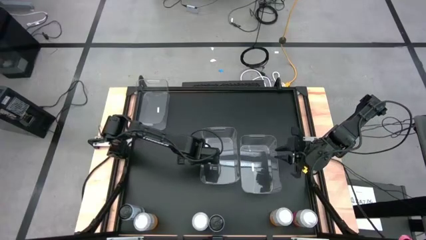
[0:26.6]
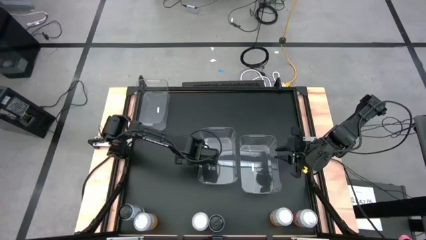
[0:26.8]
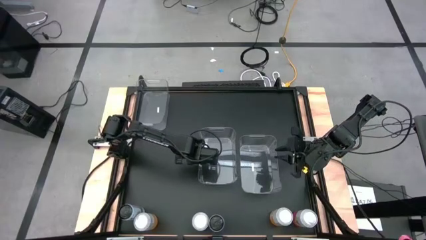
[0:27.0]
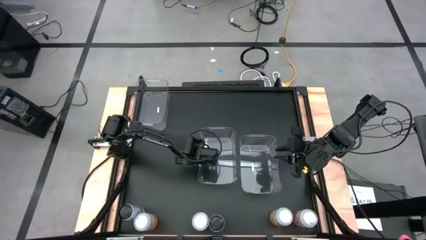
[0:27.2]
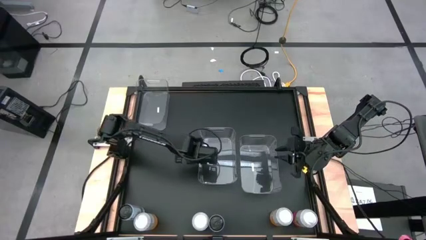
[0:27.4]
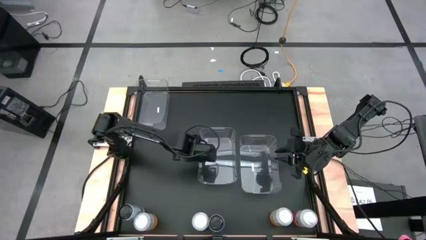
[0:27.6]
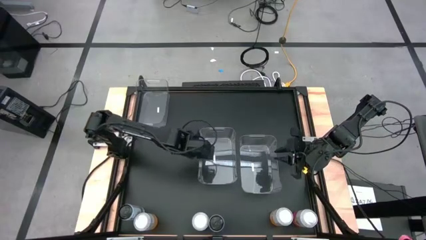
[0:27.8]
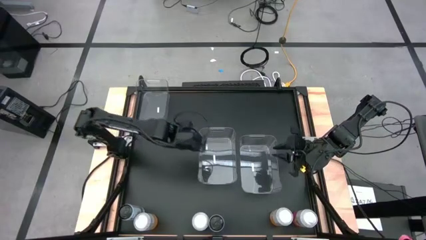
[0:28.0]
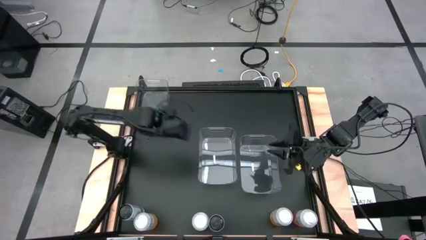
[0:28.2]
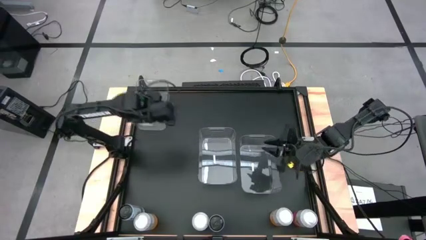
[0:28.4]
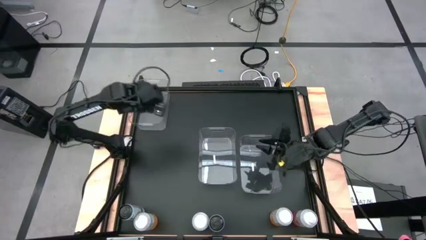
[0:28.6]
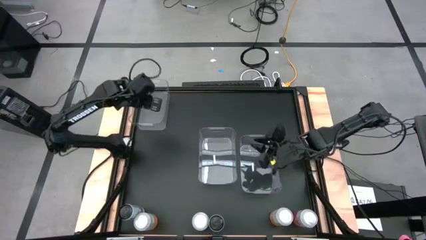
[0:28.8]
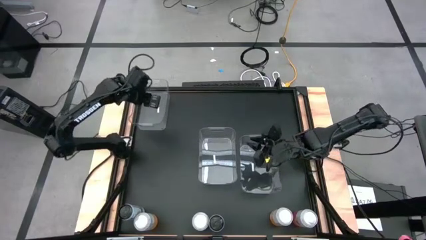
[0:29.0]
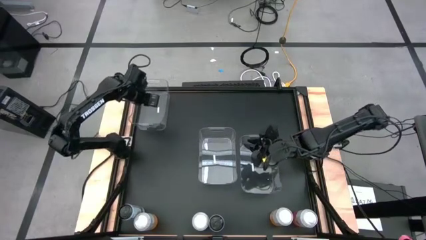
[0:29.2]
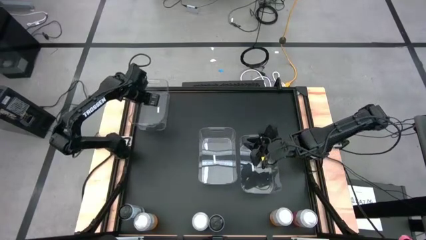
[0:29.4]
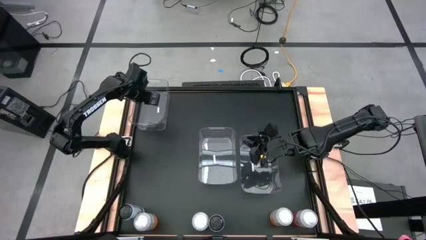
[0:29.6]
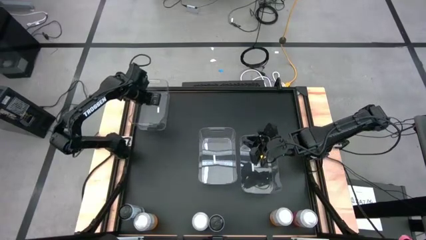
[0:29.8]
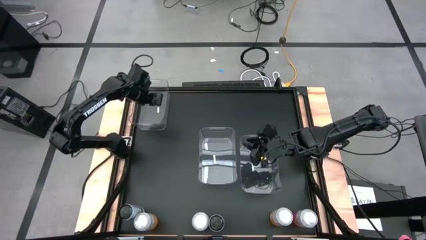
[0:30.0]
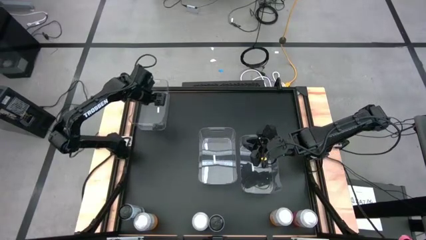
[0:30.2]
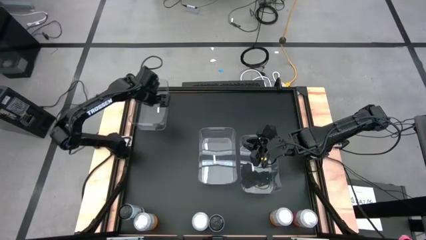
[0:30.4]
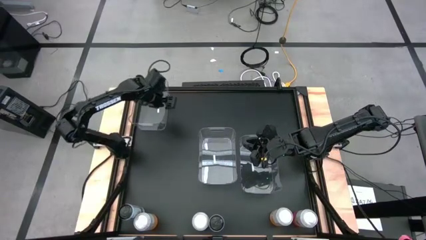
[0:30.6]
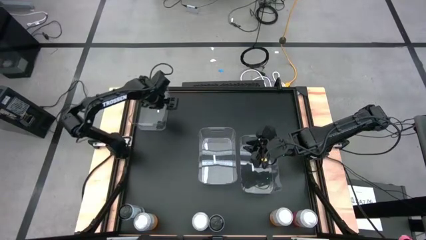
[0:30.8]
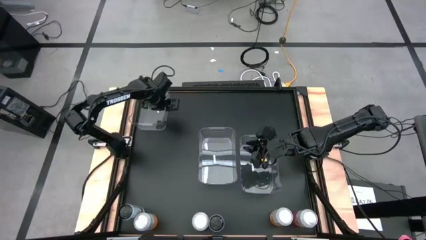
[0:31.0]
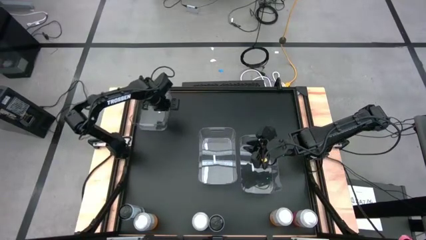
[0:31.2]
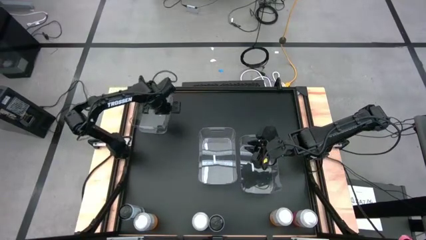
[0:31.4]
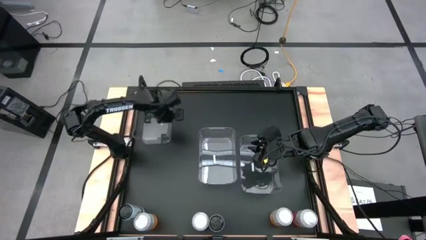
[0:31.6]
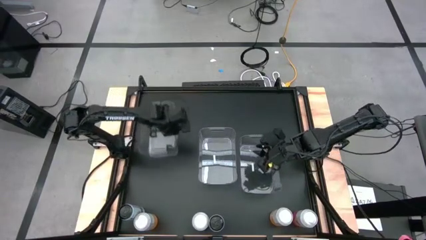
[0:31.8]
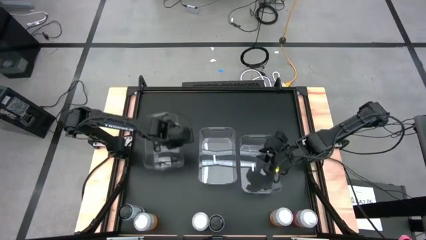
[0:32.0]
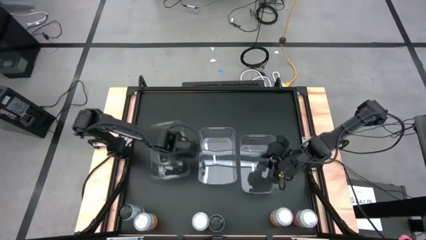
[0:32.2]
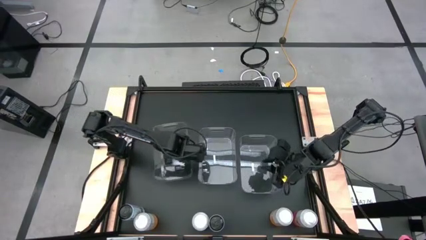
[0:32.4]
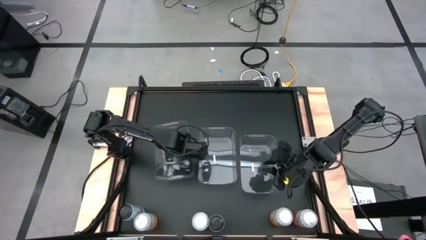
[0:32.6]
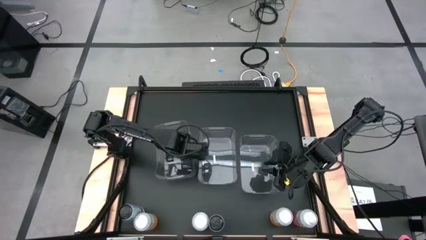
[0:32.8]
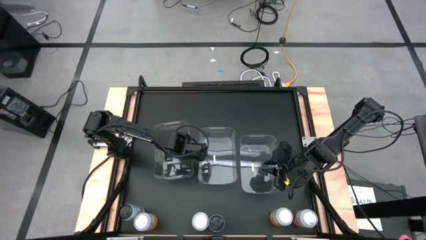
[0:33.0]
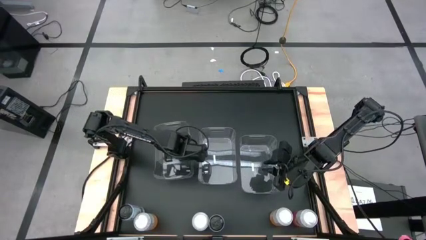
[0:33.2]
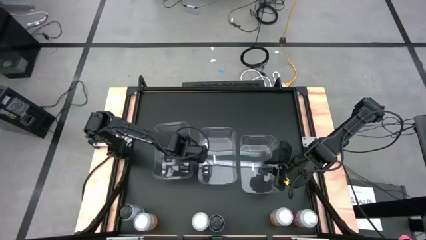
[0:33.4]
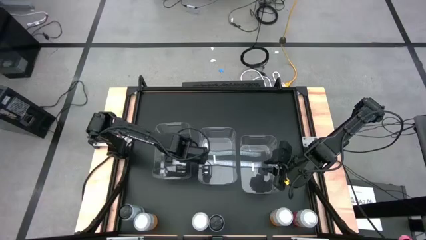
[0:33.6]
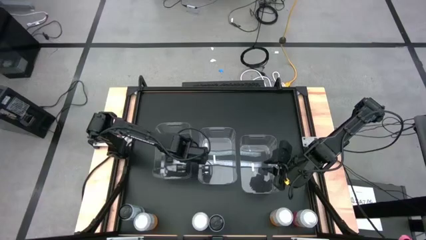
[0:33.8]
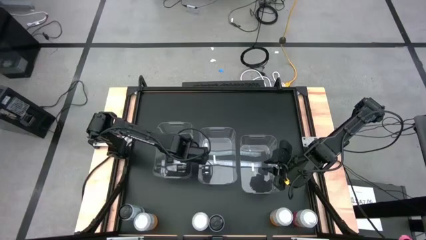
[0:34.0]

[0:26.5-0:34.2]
Task: Sort soda cans
Move the top left transparent bin to the middle left of the table

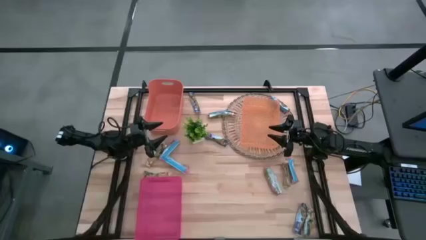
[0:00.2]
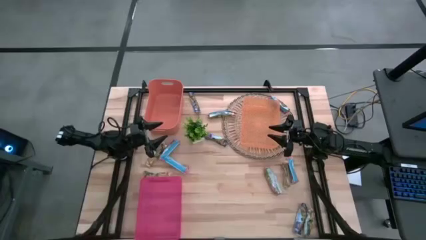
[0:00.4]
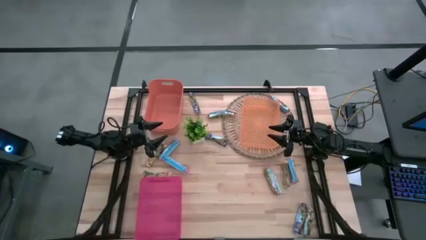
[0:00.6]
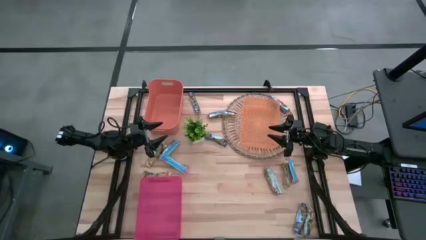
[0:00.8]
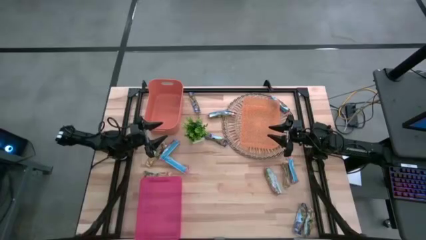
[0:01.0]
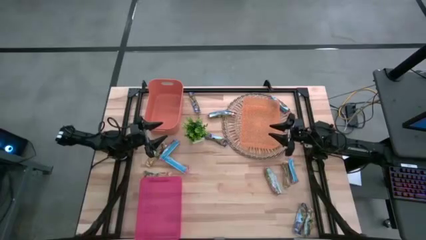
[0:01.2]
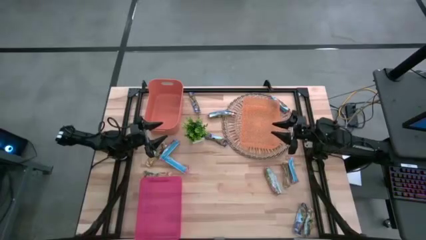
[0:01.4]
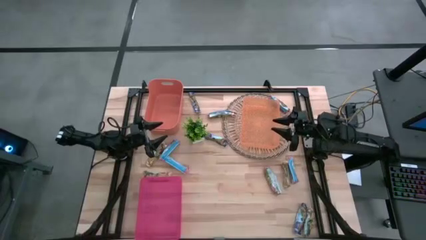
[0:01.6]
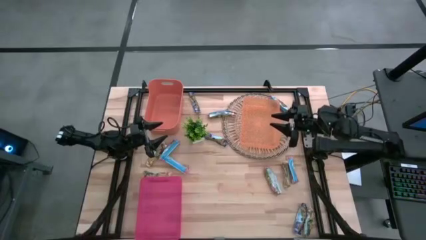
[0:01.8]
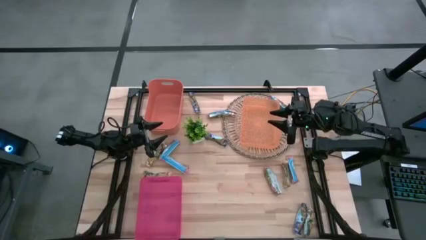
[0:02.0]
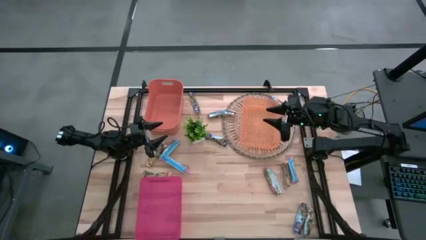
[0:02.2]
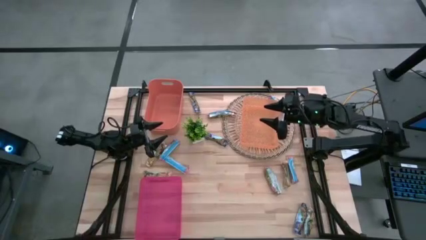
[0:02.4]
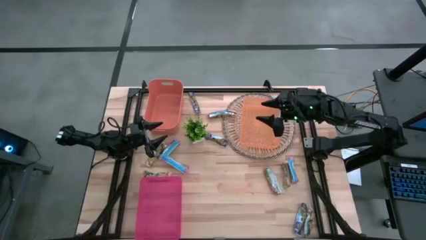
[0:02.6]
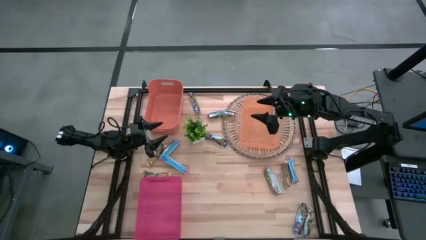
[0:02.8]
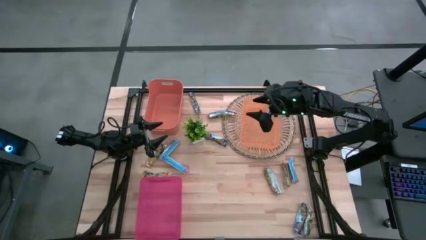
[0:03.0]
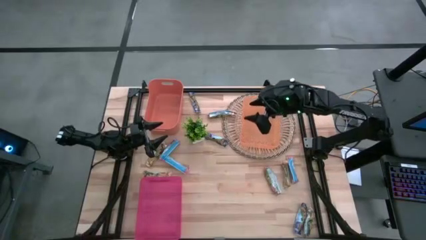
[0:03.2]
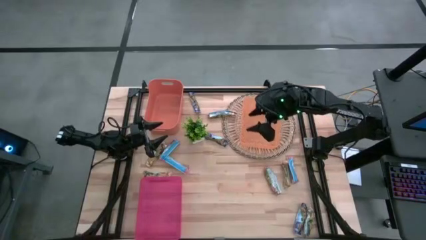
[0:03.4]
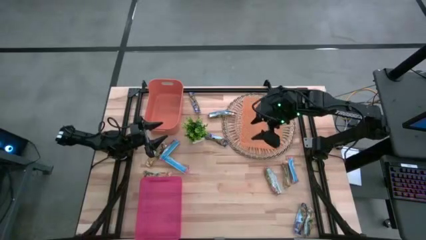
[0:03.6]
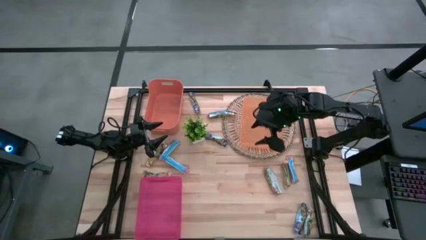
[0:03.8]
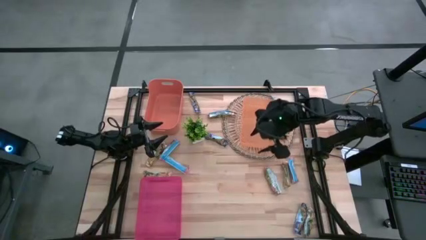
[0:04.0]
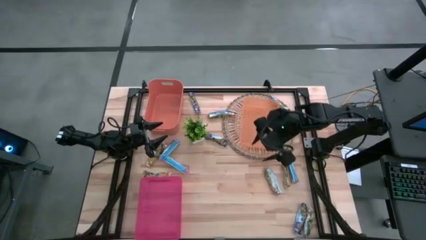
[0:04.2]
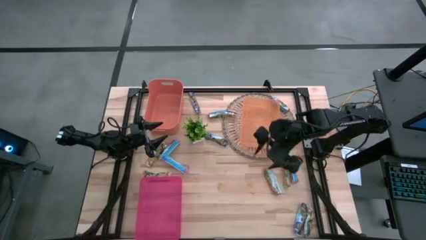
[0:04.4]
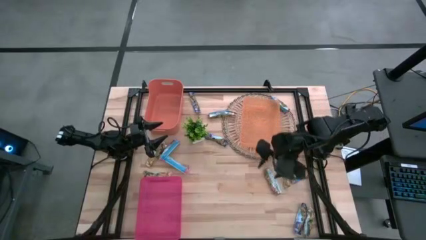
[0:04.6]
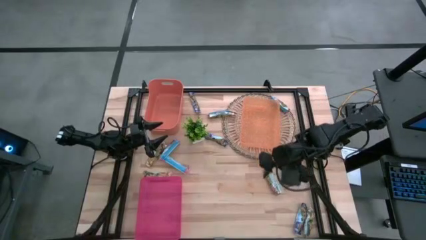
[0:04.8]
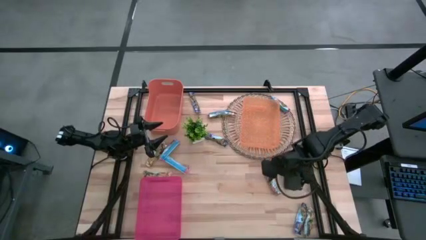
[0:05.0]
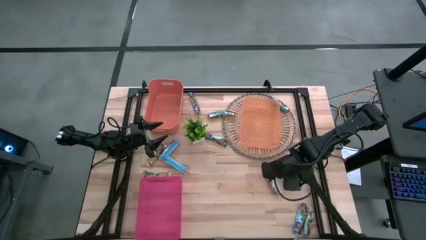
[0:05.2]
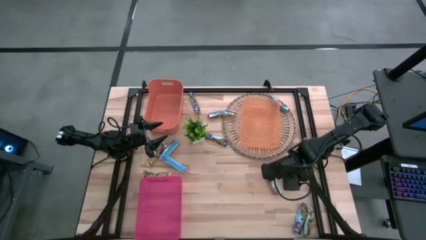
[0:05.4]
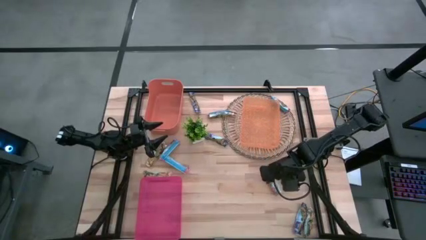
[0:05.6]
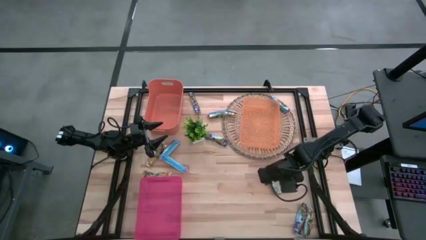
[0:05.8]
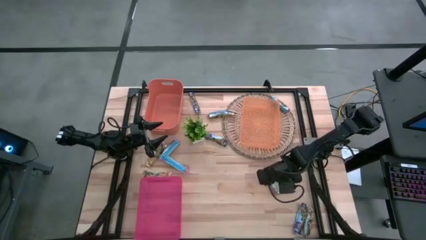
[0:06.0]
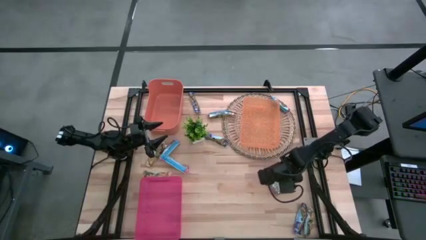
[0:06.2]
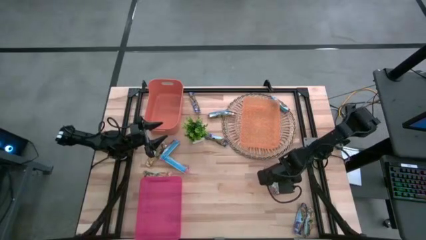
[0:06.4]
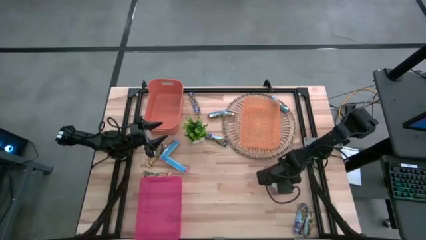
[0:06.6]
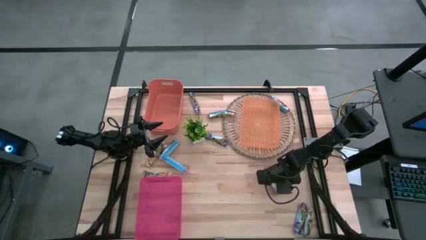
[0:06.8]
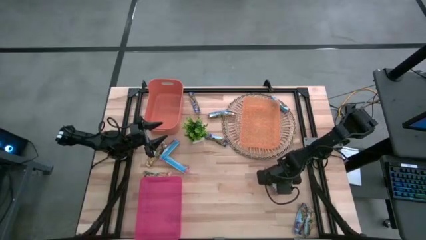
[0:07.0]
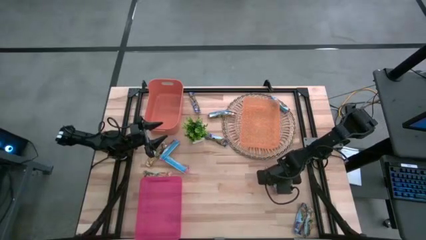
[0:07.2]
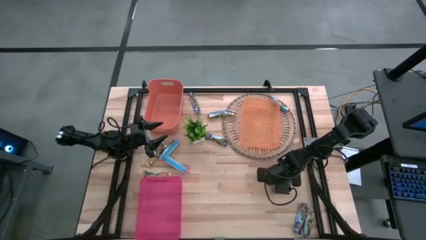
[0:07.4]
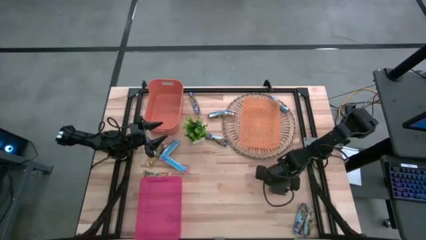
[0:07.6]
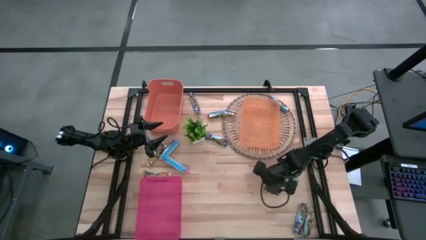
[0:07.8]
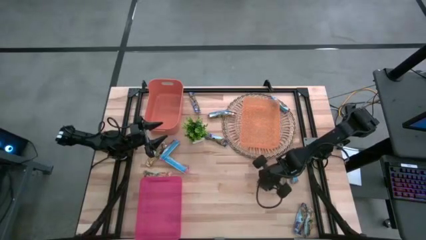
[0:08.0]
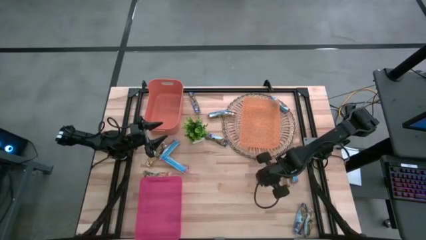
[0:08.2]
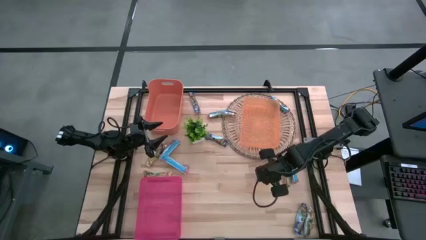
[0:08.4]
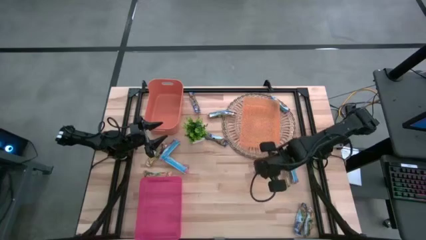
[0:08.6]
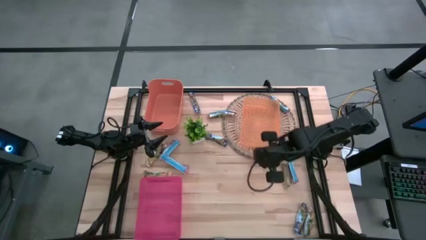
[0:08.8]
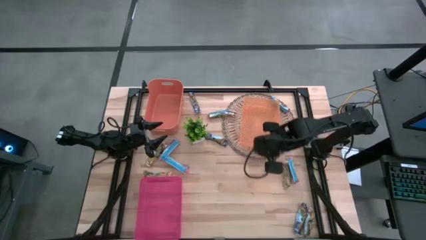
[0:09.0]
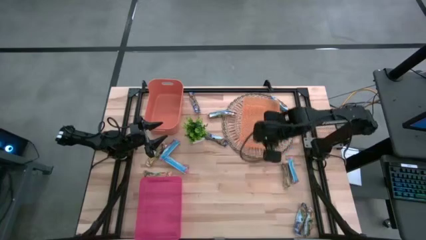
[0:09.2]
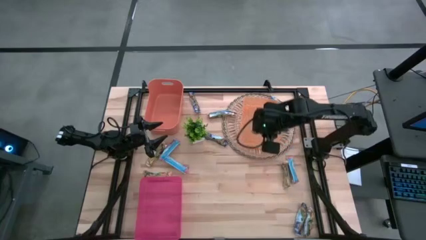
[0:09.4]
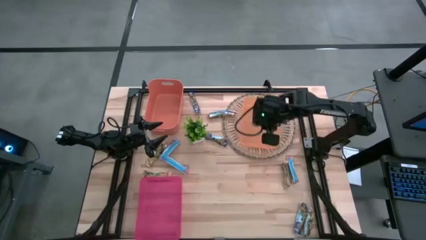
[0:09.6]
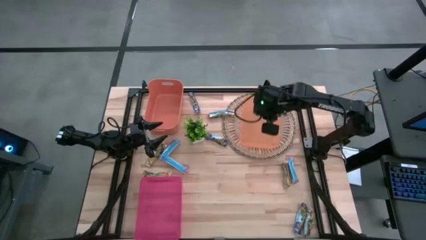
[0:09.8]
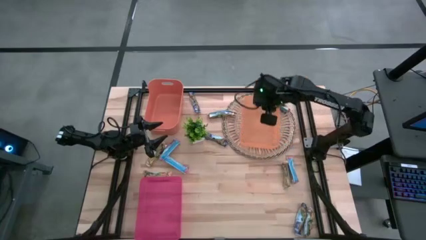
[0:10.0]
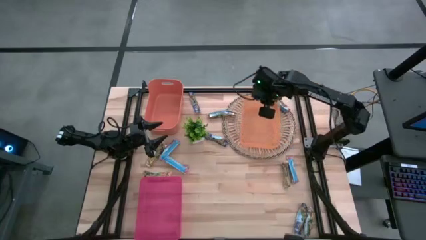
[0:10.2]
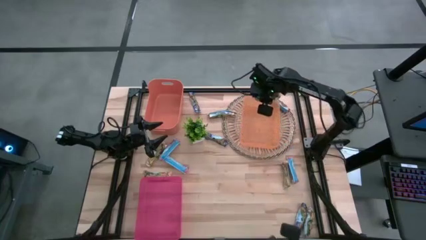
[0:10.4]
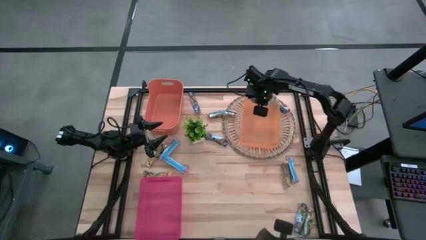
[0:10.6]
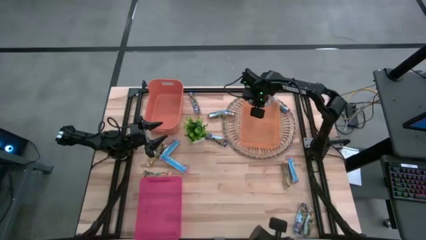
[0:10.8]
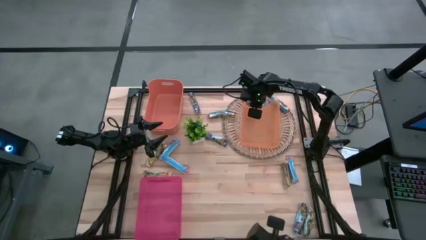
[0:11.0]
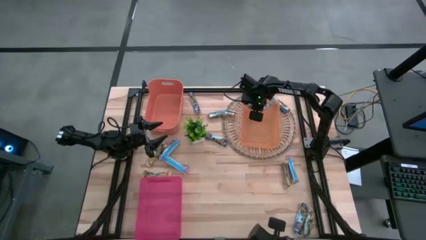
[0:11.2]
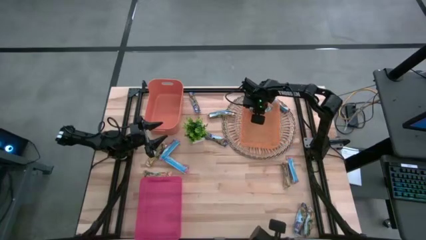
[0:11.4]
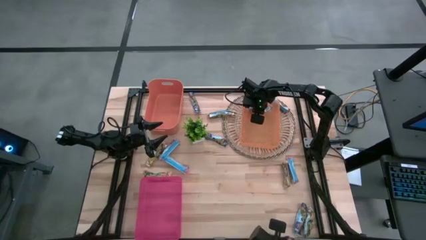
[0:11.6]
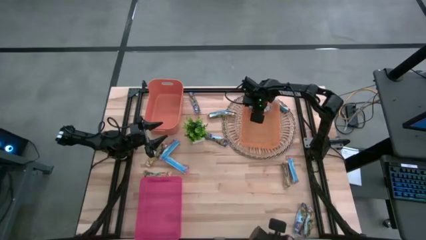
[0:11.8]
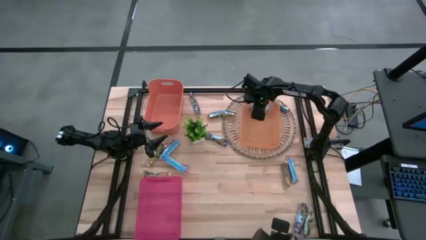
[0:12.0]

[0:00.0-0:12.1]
Task: Pick and place Granola Bars by type
Put the red granola bar into the right orange bin
